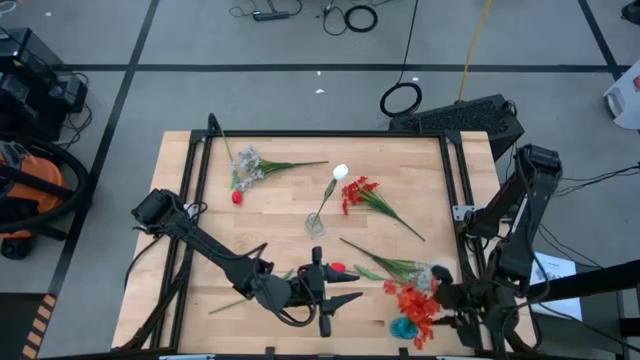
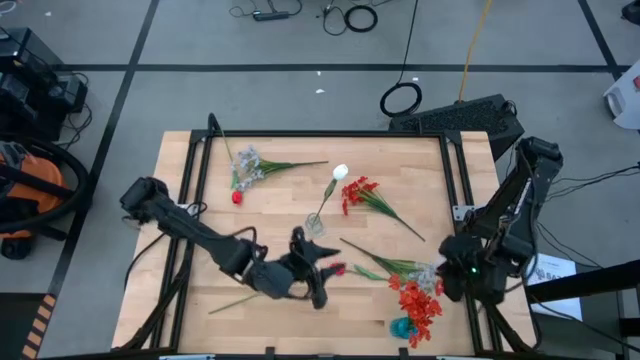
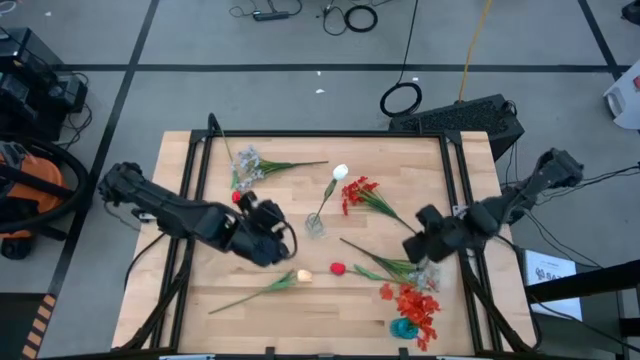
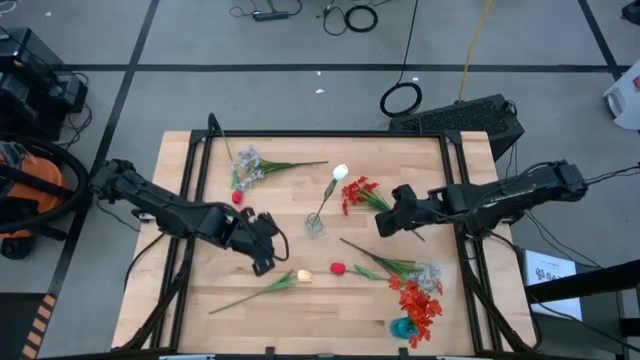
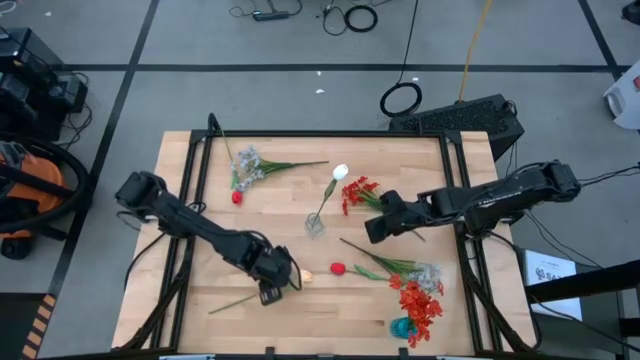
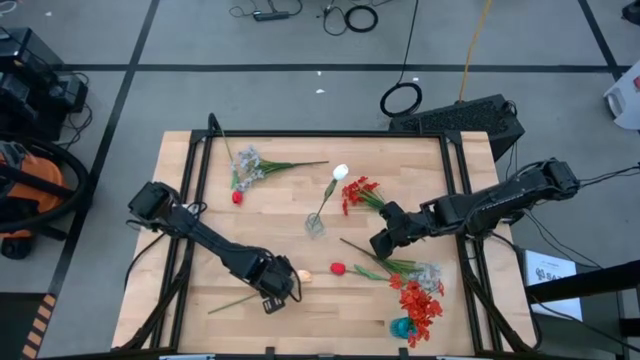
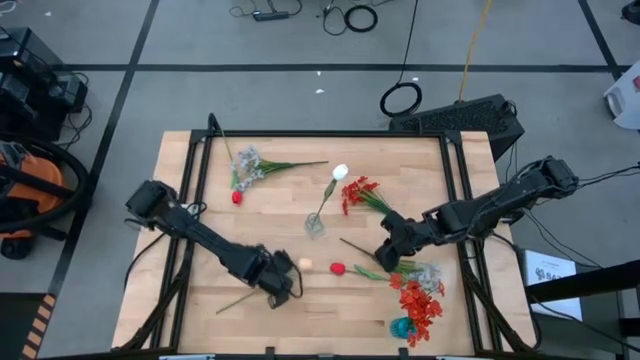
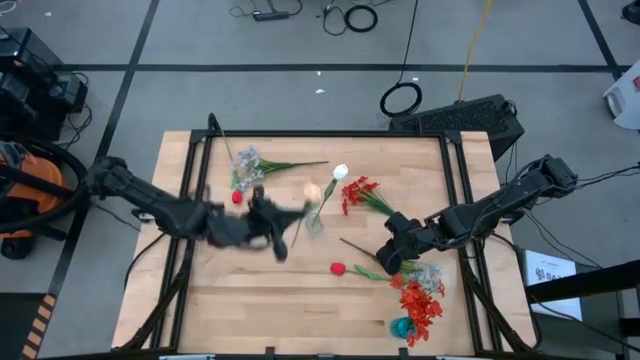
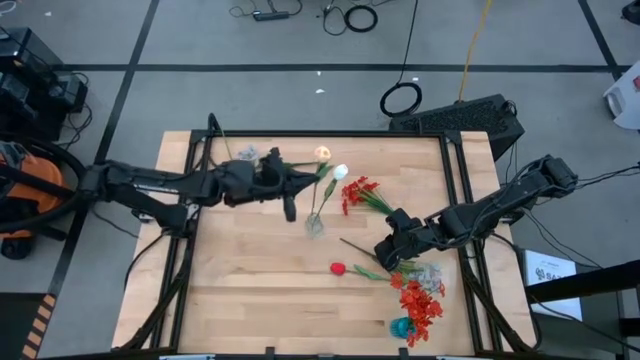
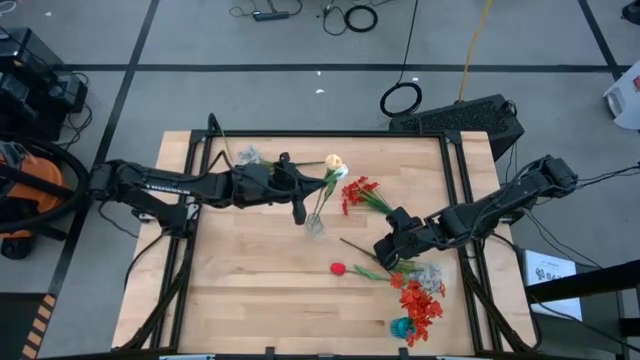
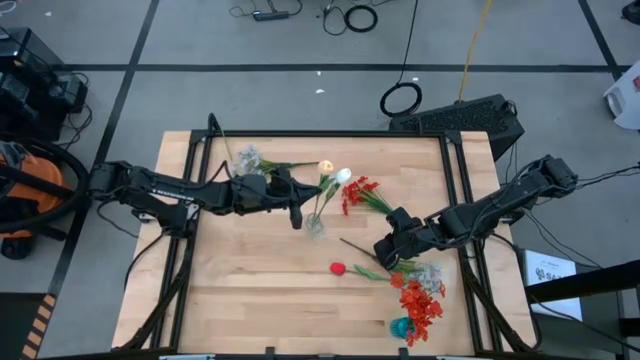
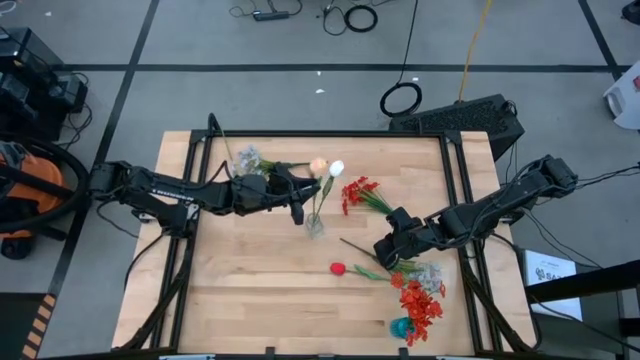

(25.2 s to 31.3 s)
Task: Sort flowers into vase by color
Put the yellow tulip into the transparent vase

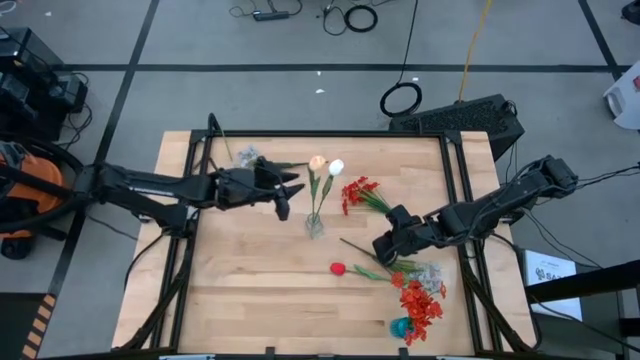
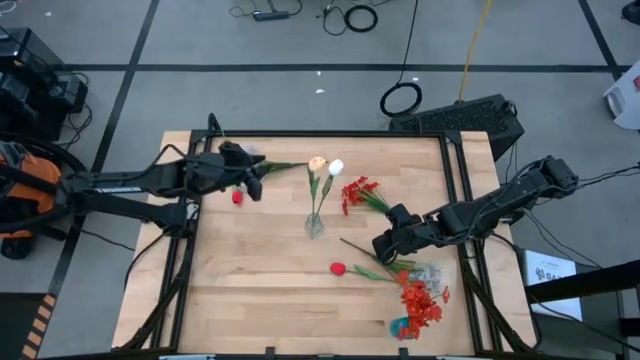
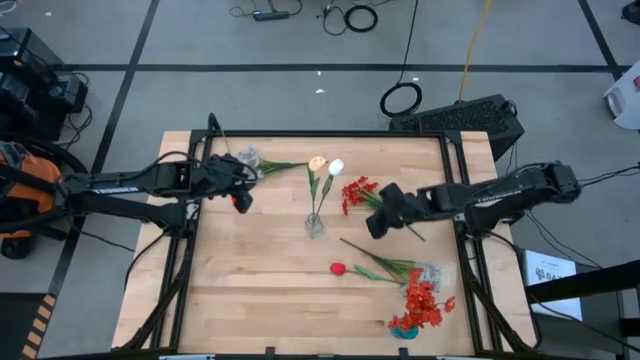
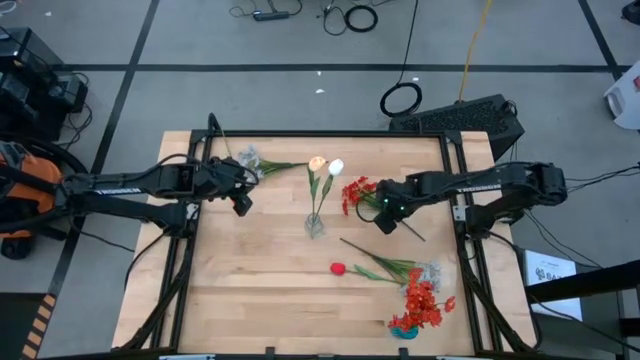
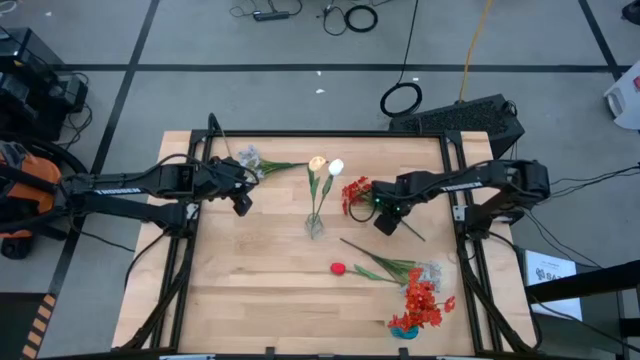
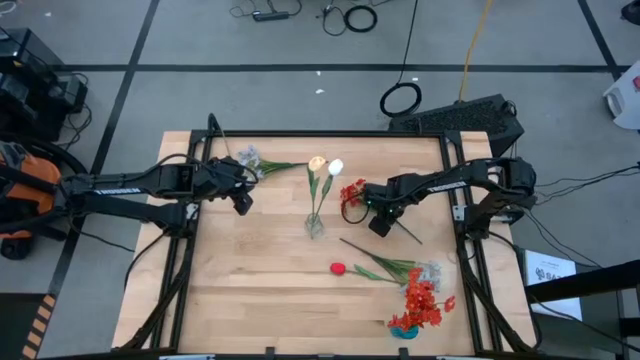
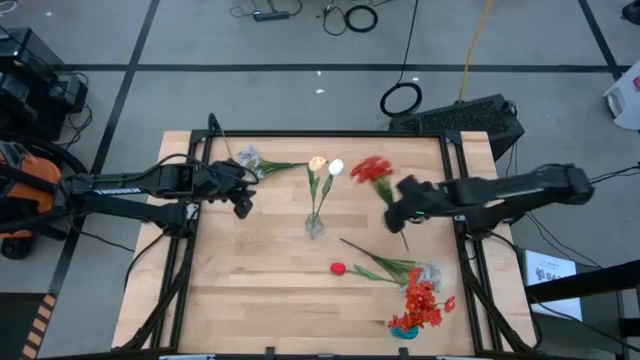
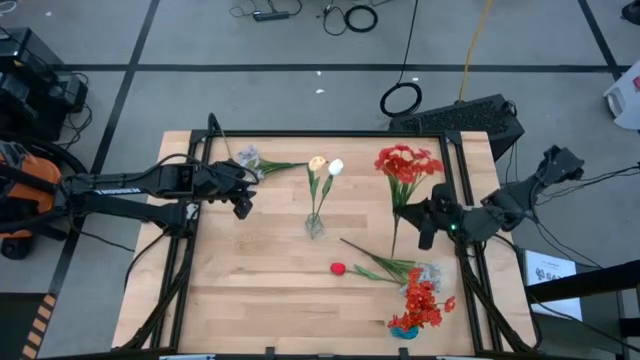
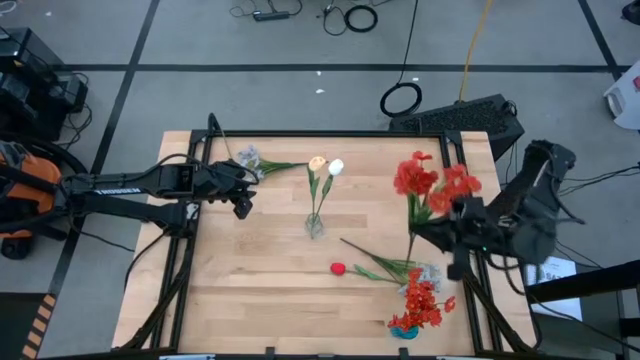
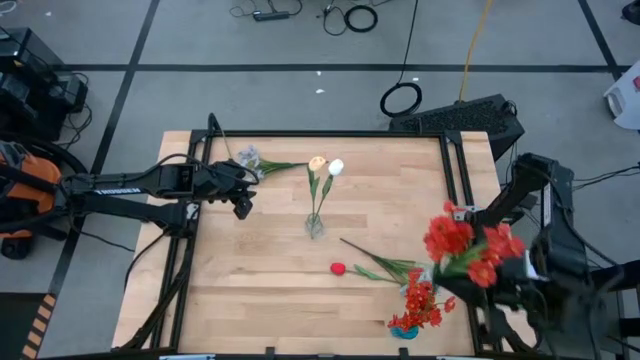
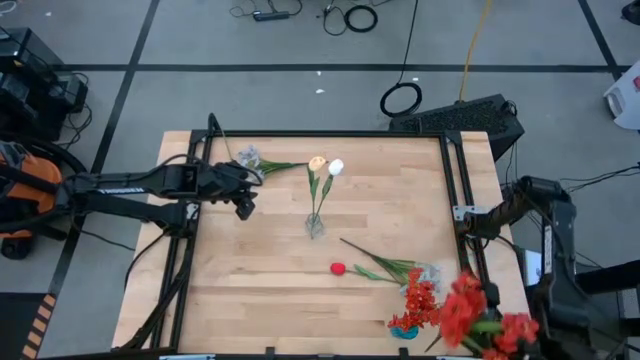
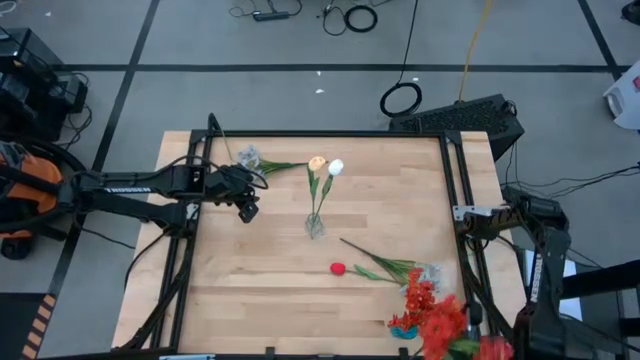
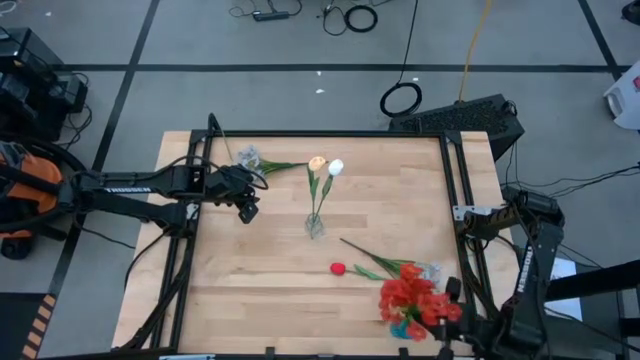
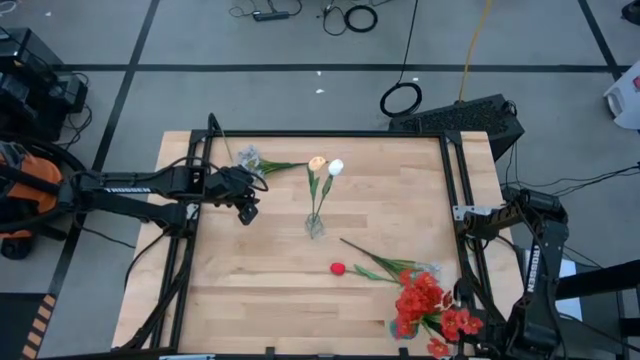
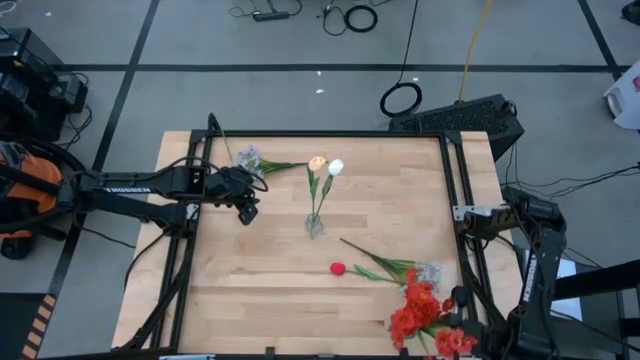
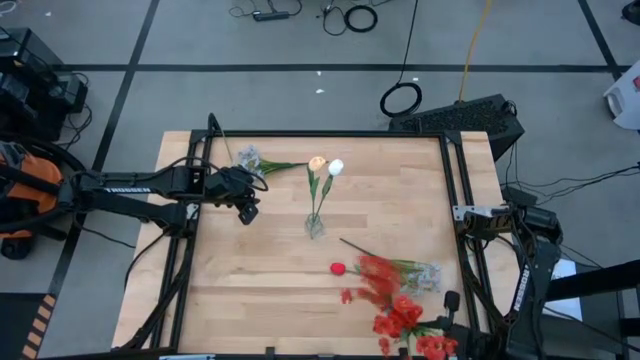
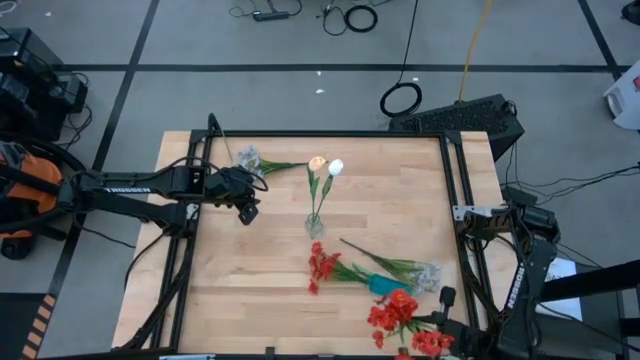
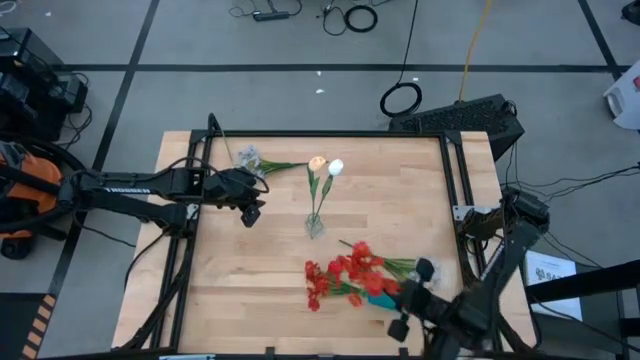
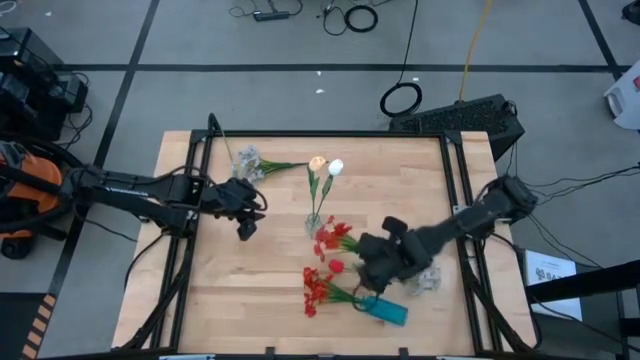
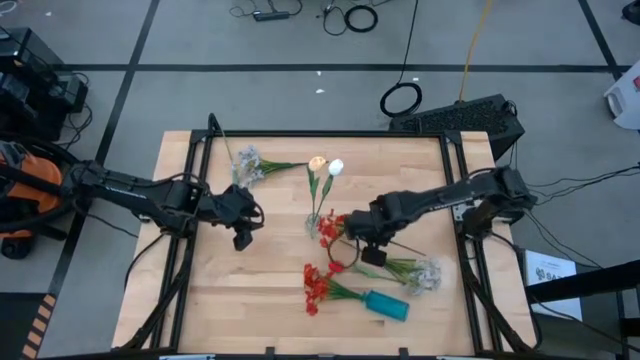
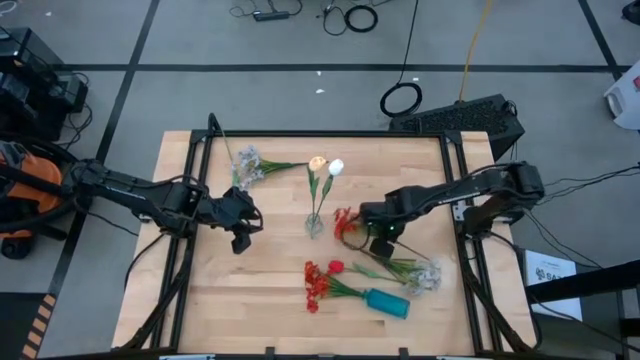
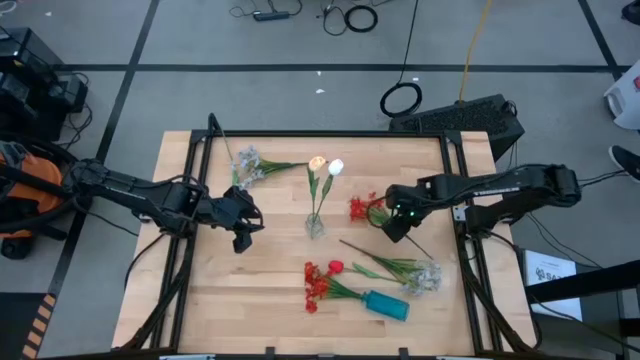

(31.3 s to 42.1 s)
Put the red flowers into the blue vase

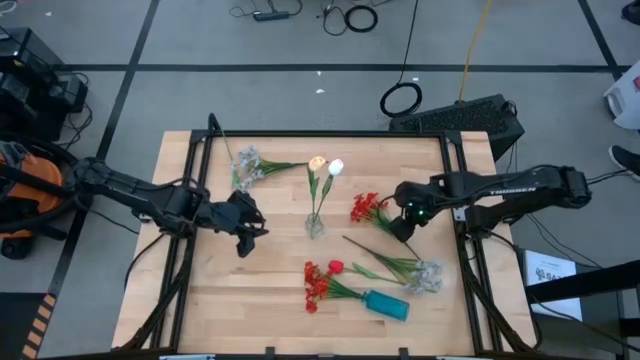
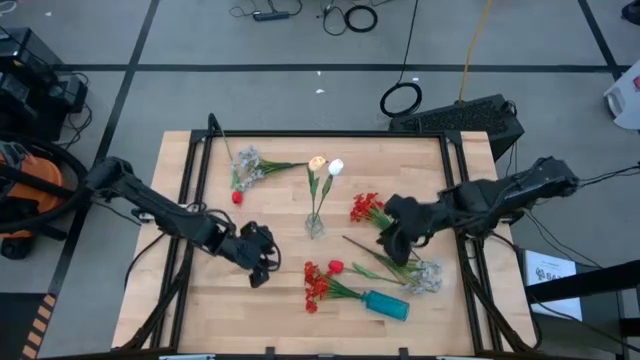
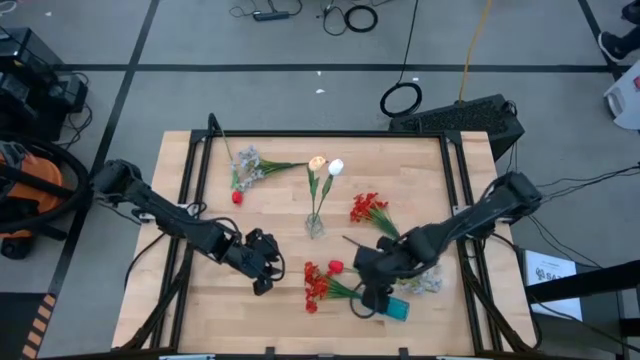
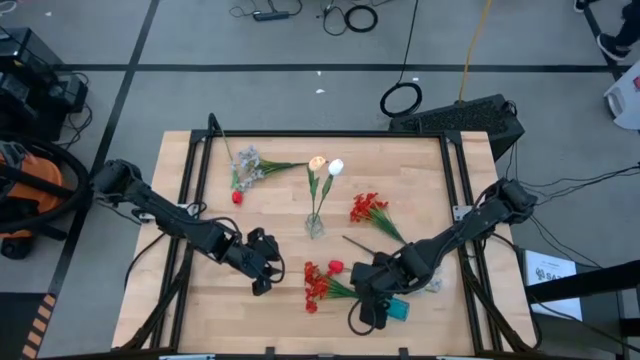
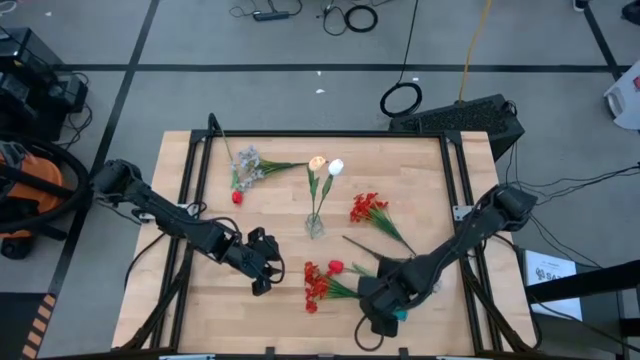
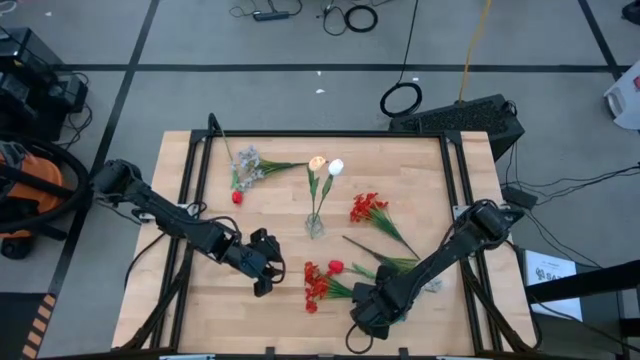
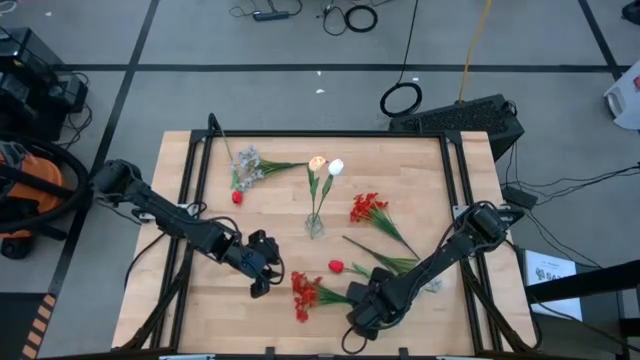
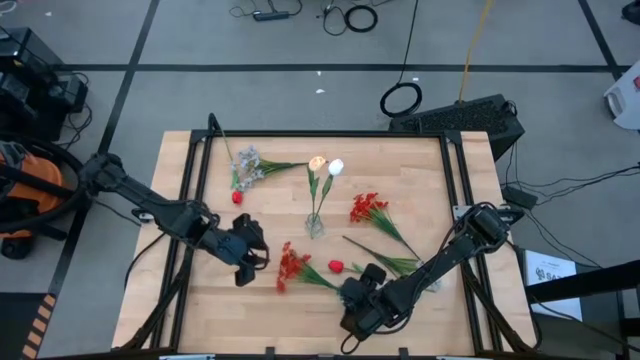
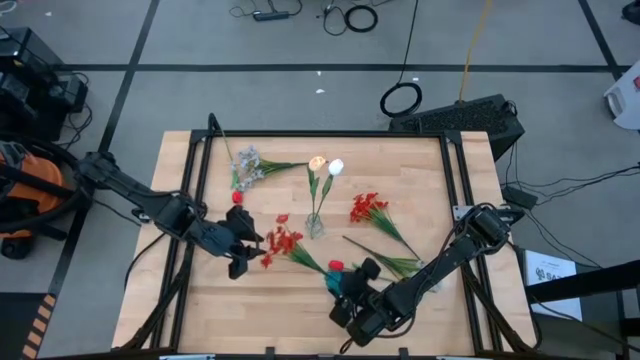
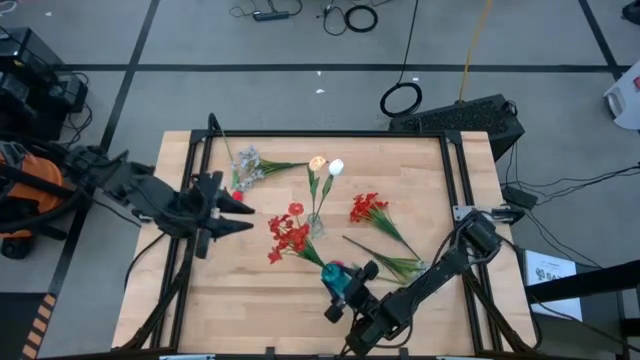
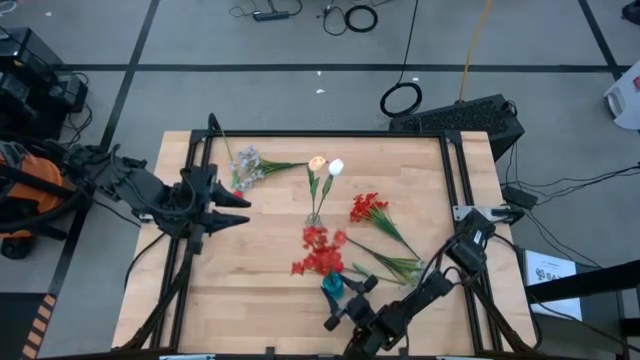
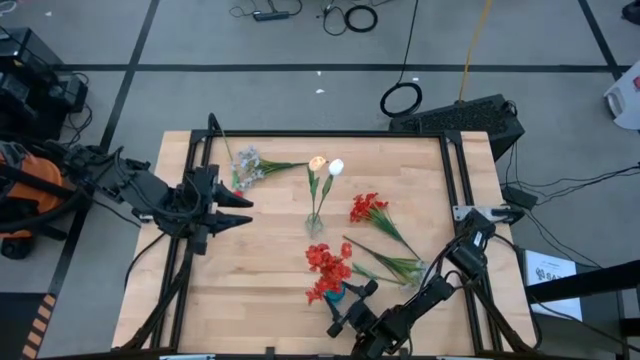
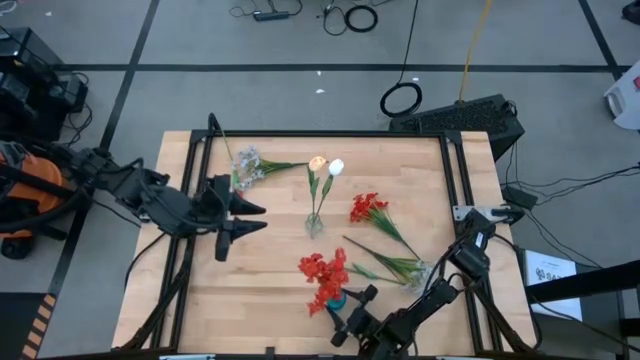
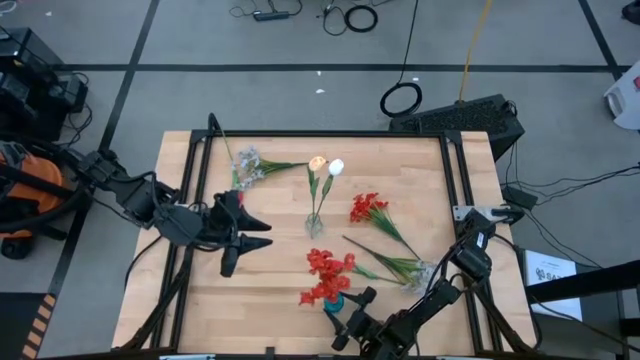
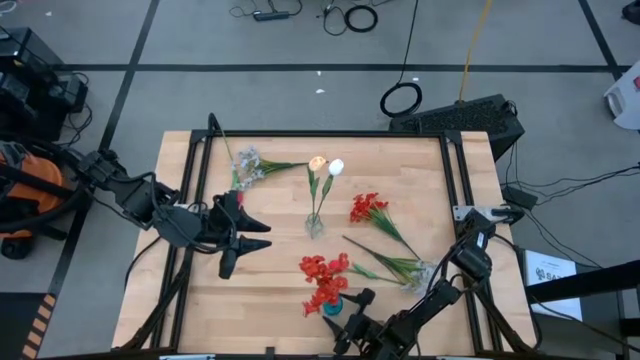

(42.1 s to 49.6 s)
Adjust the blue vase on the table
